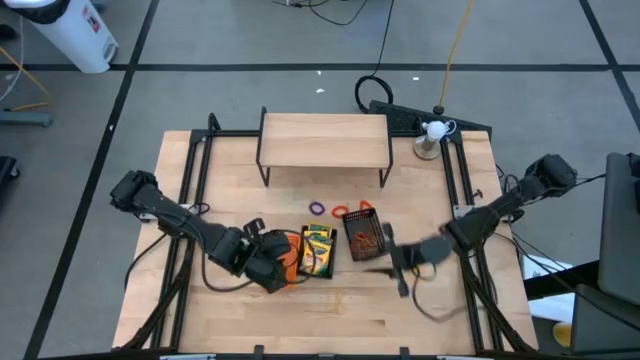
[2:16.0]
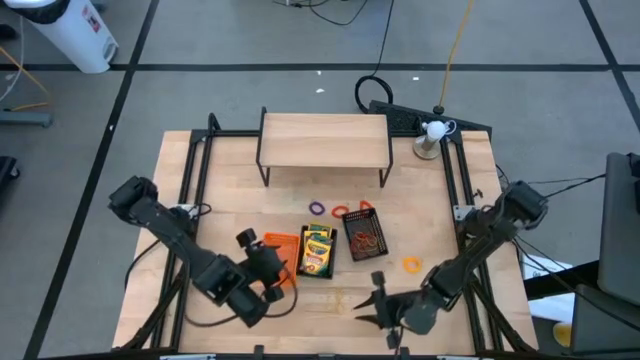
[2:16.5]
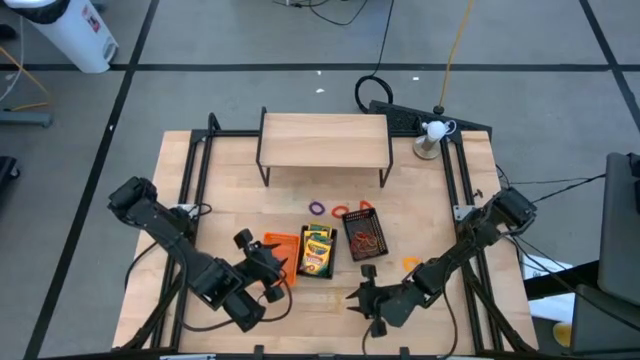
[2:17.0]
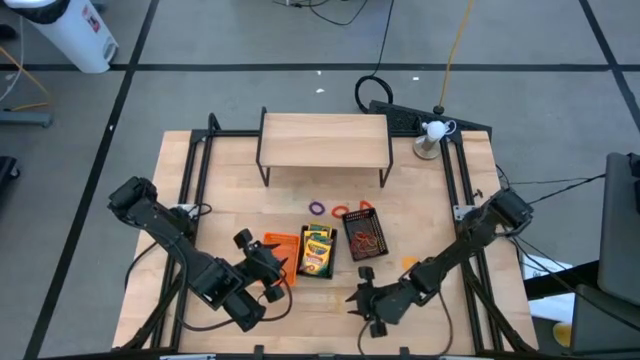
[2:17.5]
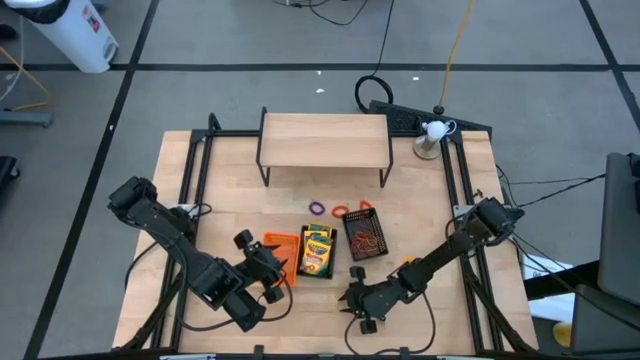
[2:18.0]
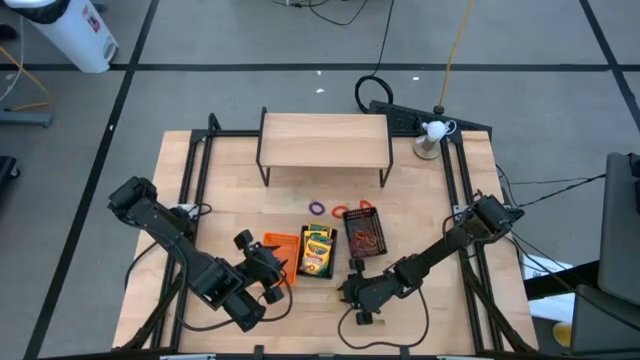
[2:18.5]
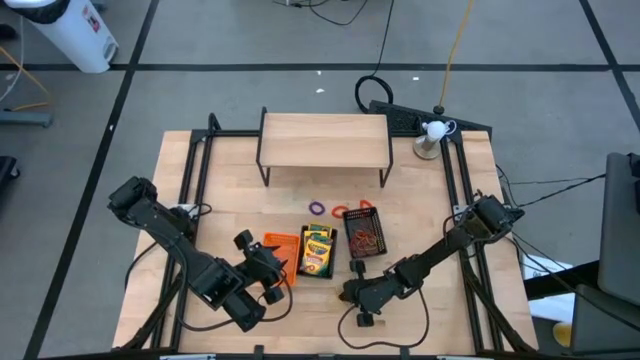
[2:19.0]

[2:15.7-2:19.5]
Task: Pick & Place Office Desk Supplies
Put the yellow rubber band into the right black bin

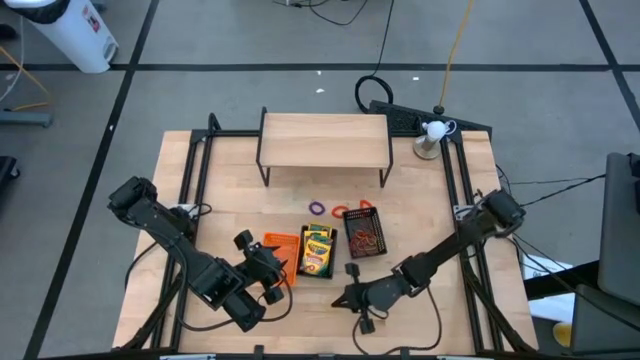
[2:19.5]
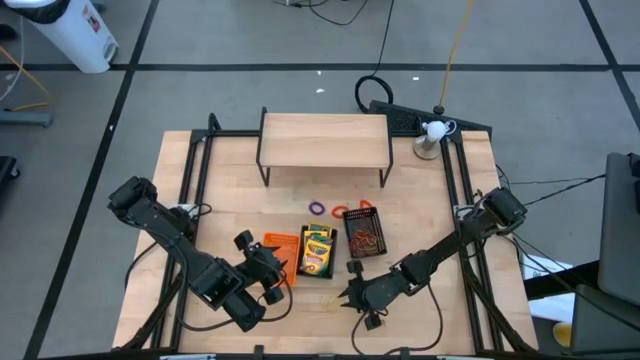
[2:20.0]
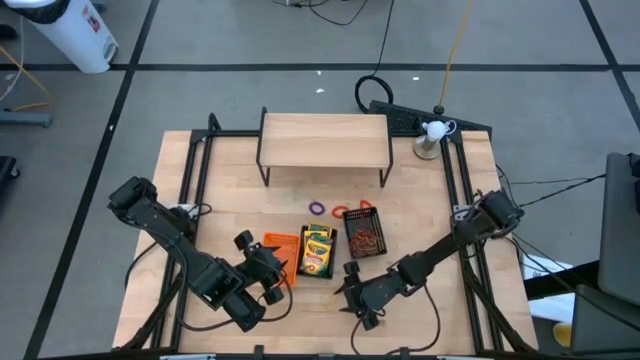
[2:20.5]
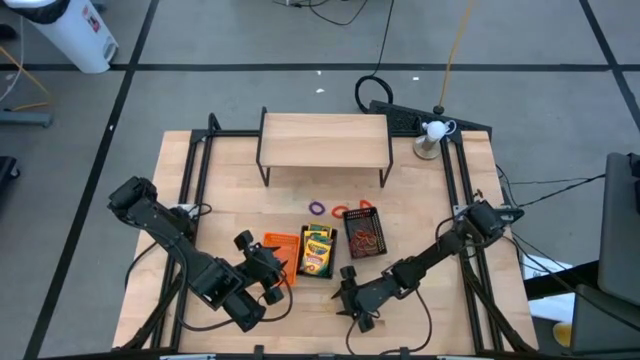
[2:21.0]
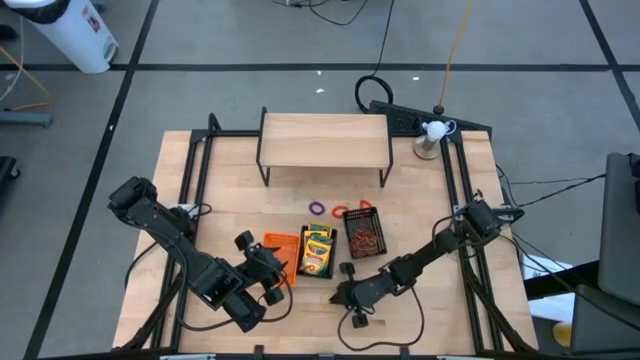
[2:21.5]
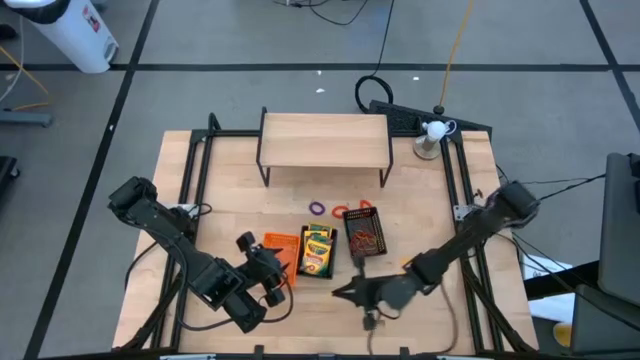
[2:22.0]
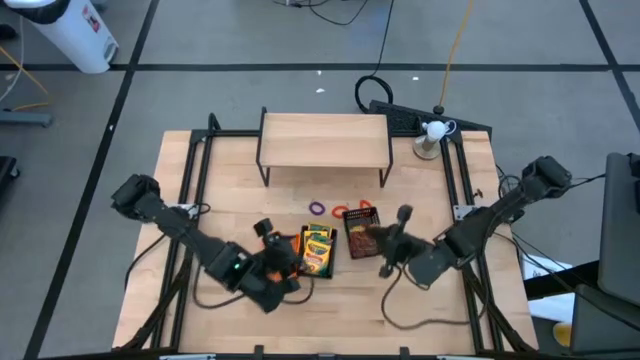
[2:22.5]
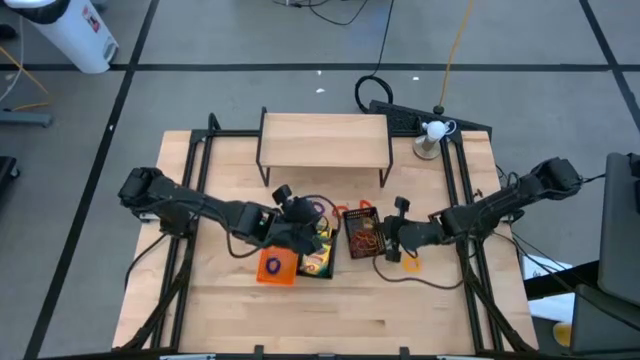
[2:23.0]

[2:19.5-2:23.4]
Put the yellow rubber band into the right black bin

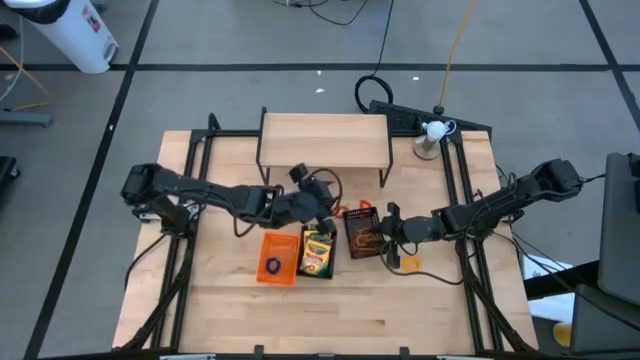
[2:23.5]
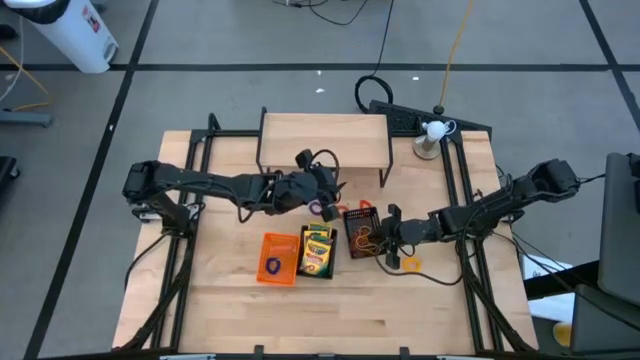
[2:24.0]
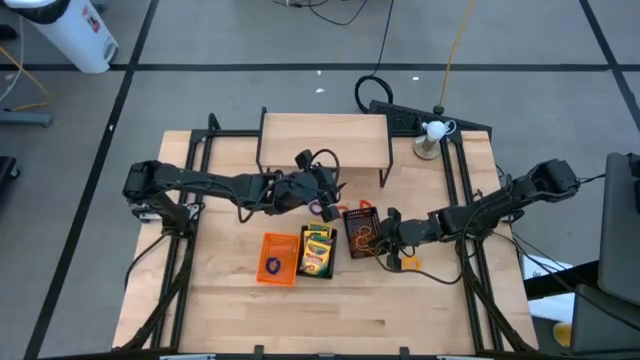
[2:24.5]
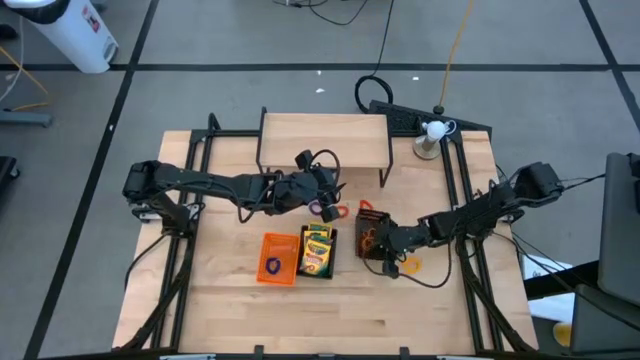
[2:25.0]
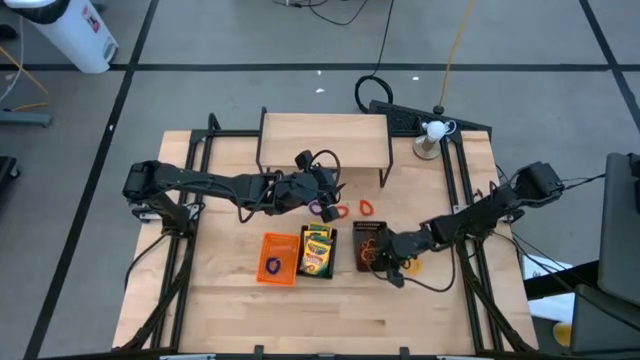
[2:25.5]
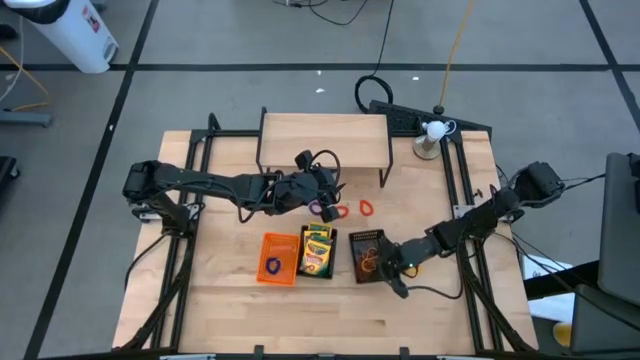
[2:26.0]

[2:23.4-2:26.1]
Adjust the right black bin

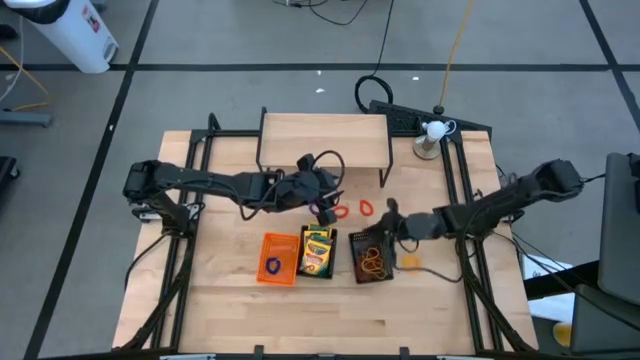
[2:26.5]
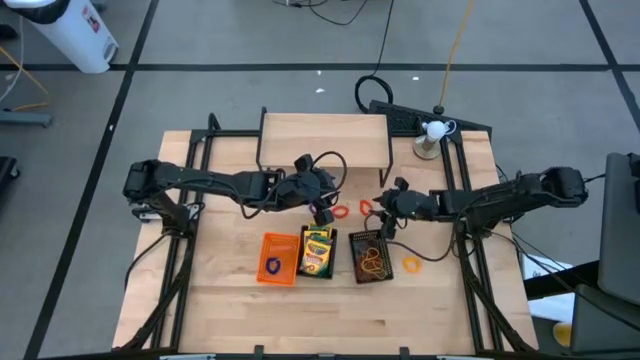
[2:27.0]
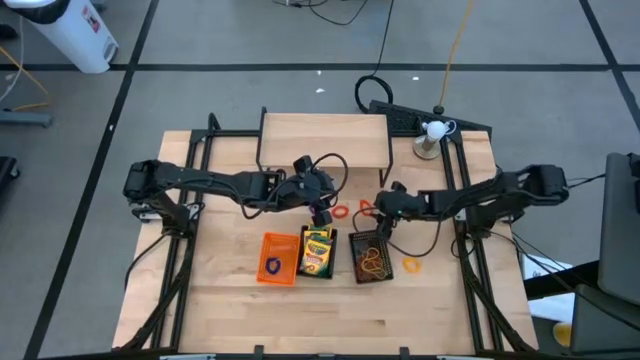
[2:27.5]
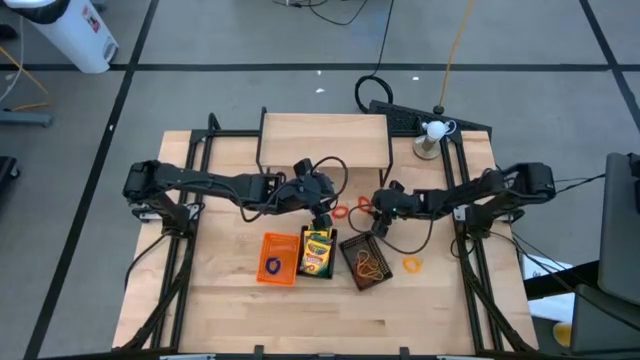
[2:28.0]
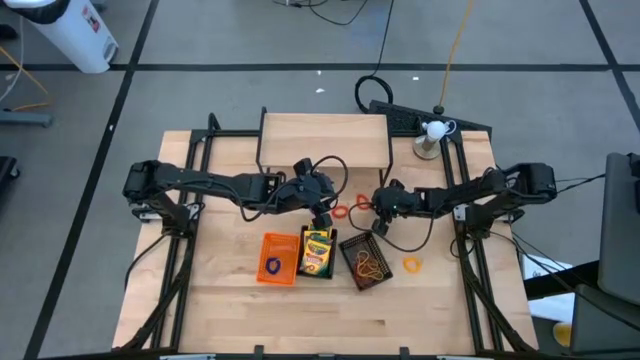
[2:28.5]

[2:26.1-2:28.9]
Put the orange keychain into the orange bin
